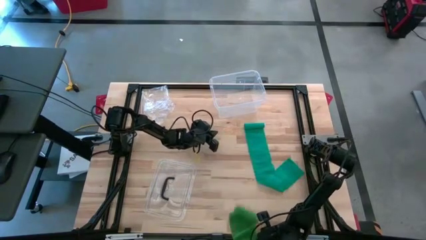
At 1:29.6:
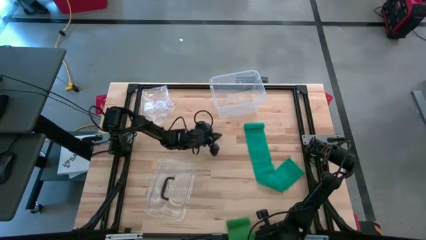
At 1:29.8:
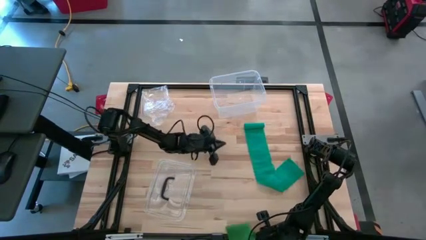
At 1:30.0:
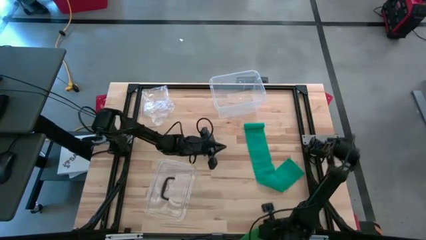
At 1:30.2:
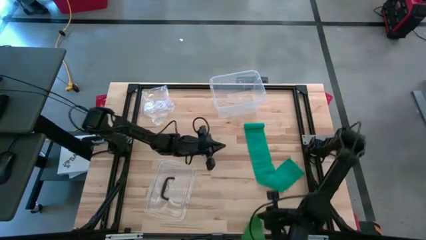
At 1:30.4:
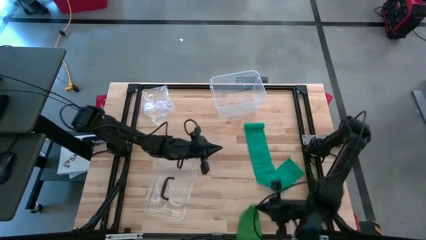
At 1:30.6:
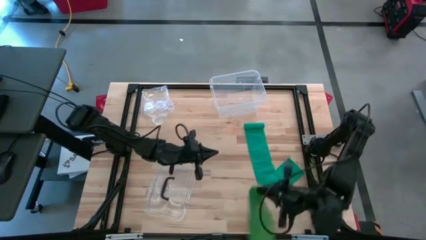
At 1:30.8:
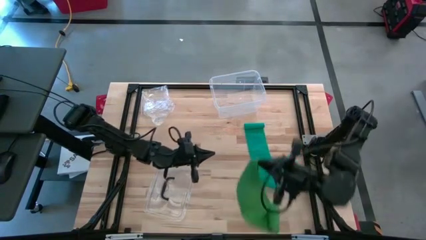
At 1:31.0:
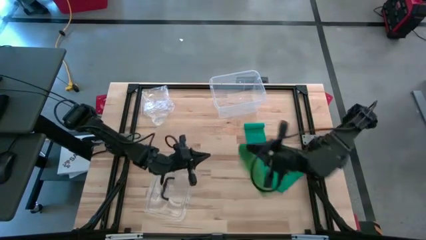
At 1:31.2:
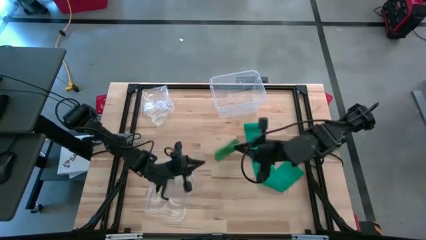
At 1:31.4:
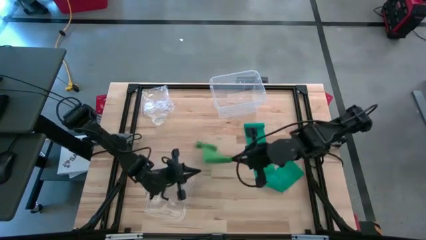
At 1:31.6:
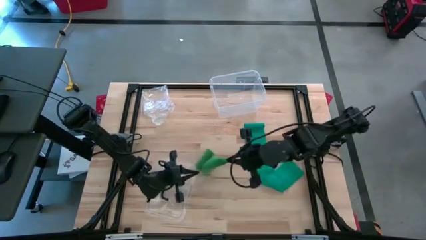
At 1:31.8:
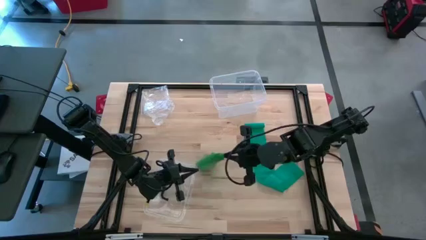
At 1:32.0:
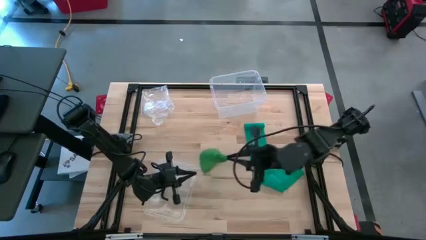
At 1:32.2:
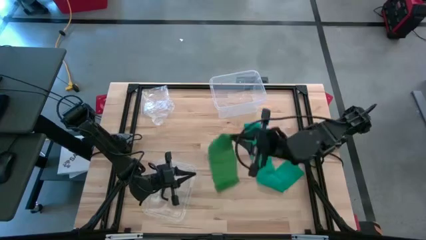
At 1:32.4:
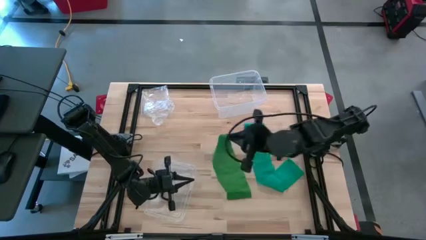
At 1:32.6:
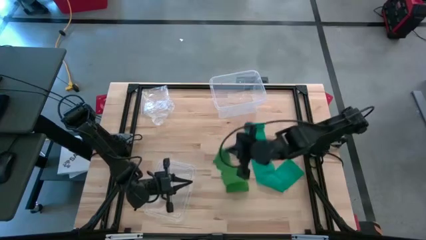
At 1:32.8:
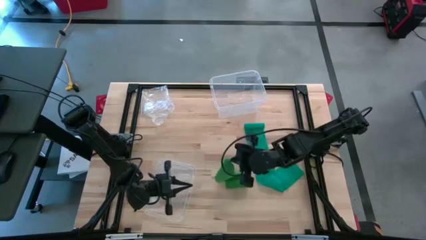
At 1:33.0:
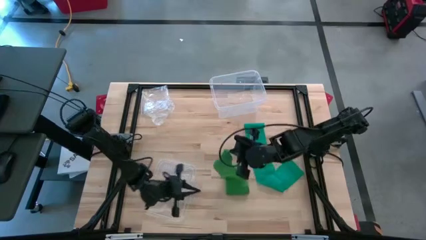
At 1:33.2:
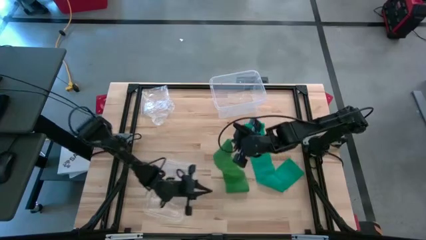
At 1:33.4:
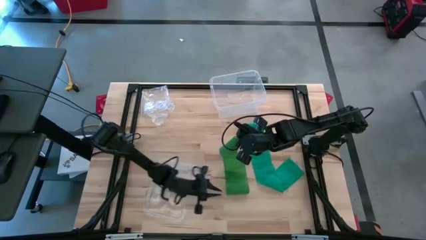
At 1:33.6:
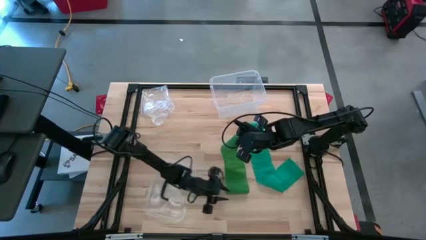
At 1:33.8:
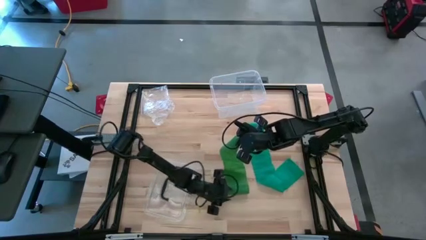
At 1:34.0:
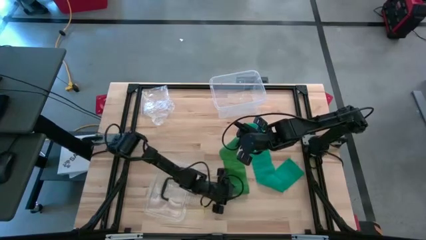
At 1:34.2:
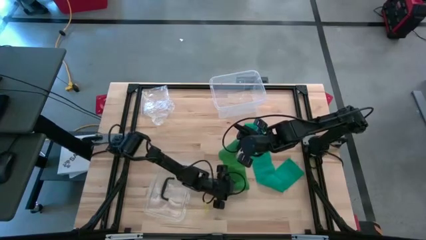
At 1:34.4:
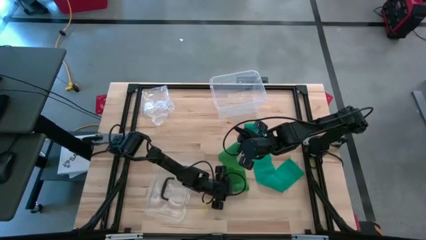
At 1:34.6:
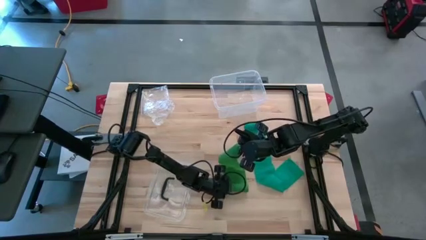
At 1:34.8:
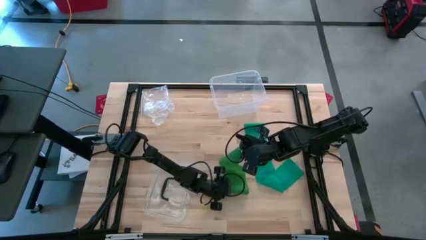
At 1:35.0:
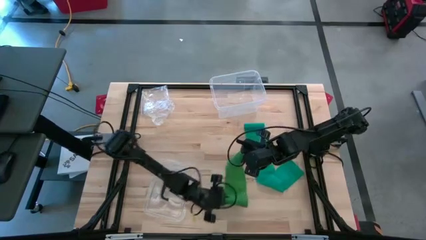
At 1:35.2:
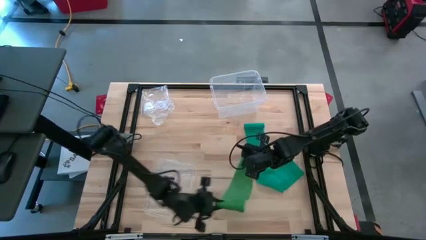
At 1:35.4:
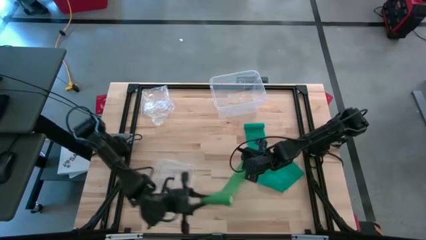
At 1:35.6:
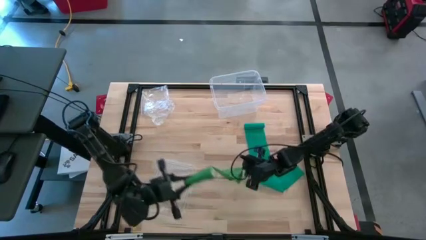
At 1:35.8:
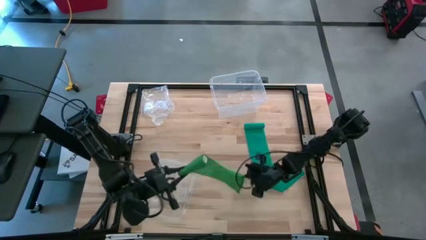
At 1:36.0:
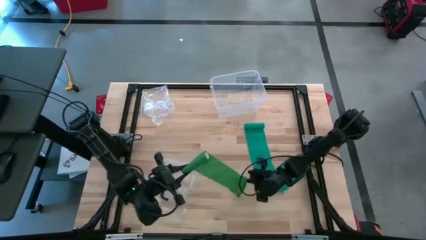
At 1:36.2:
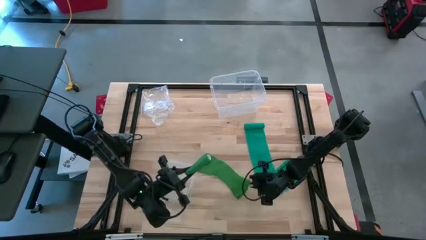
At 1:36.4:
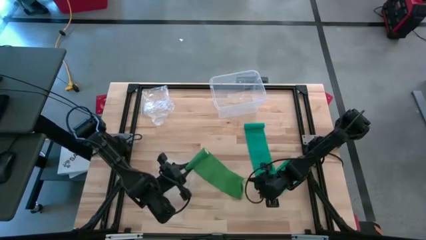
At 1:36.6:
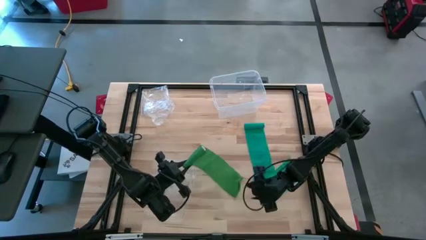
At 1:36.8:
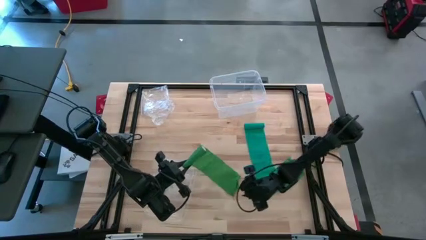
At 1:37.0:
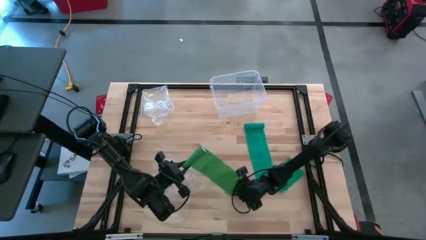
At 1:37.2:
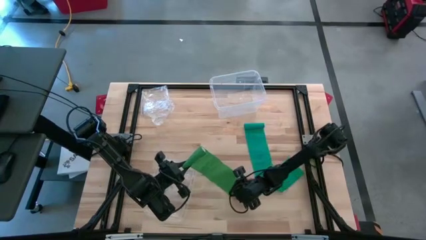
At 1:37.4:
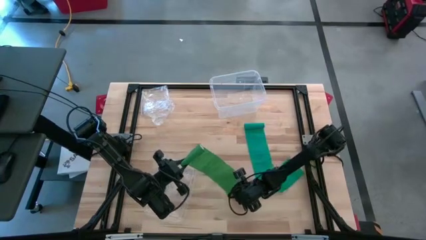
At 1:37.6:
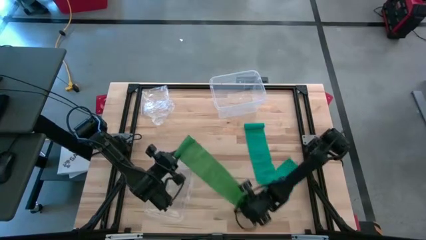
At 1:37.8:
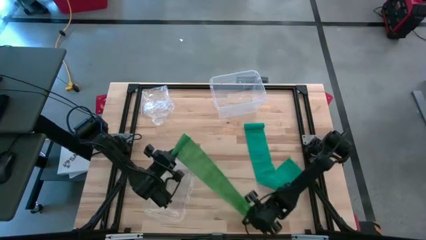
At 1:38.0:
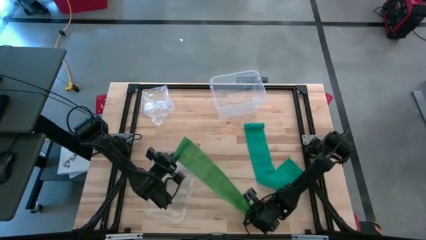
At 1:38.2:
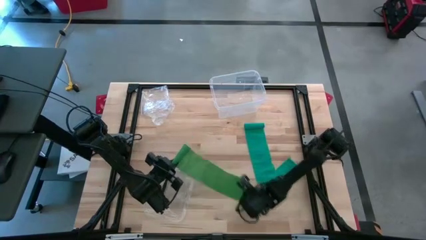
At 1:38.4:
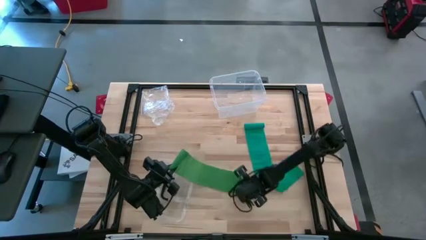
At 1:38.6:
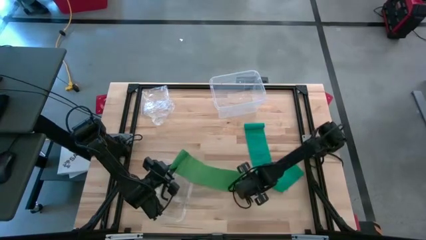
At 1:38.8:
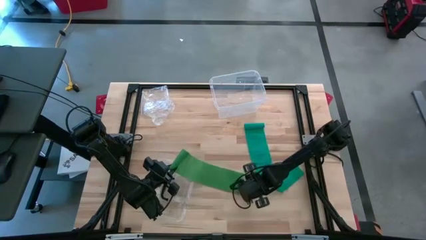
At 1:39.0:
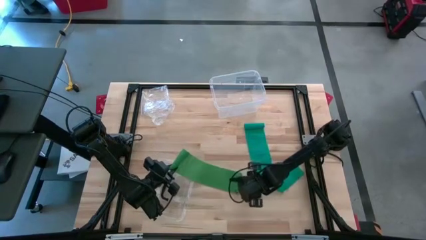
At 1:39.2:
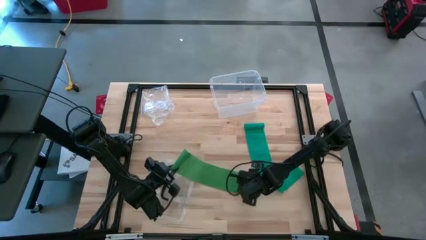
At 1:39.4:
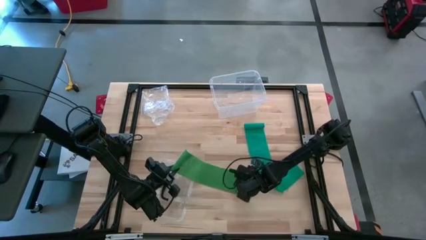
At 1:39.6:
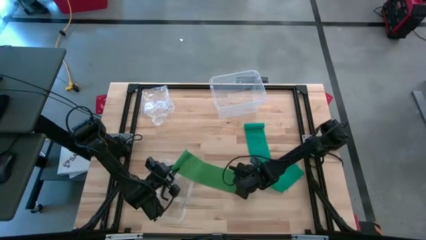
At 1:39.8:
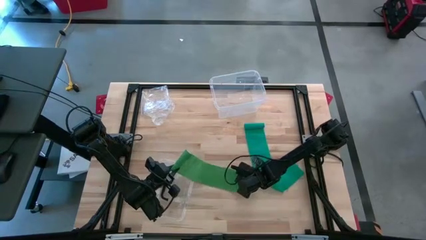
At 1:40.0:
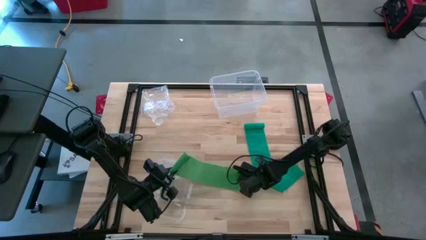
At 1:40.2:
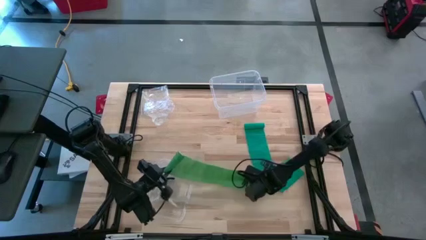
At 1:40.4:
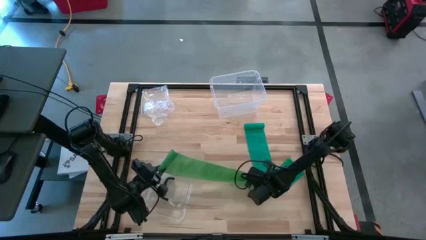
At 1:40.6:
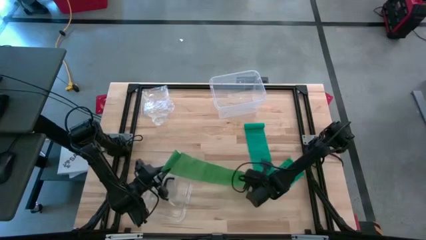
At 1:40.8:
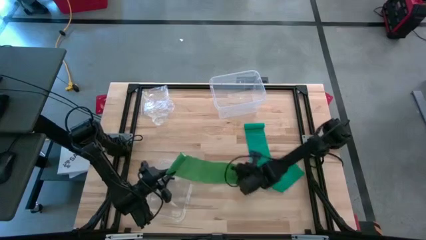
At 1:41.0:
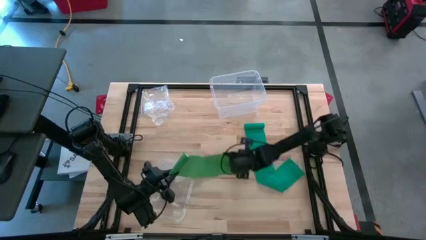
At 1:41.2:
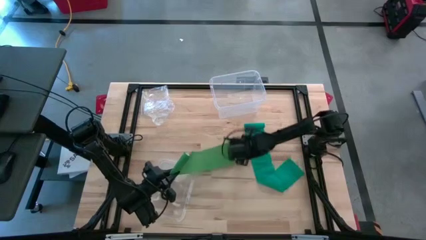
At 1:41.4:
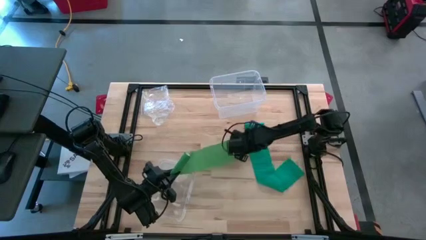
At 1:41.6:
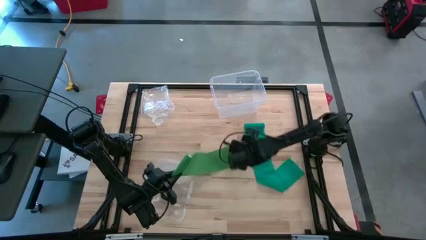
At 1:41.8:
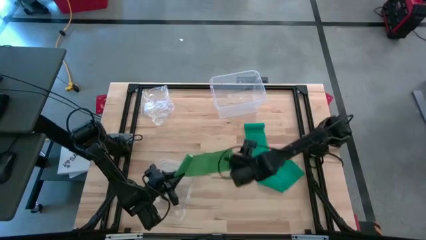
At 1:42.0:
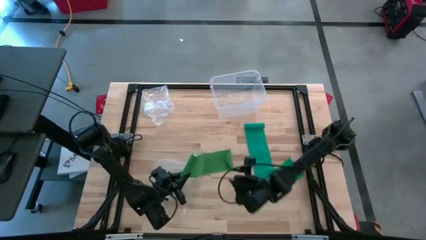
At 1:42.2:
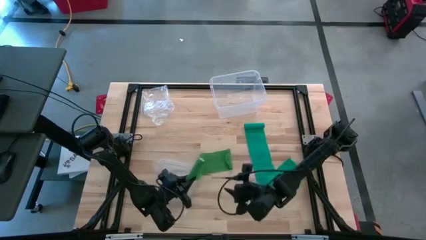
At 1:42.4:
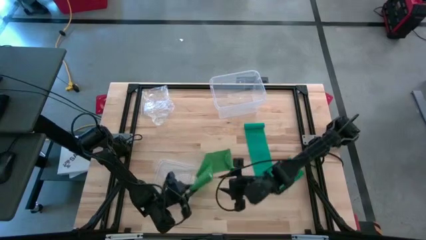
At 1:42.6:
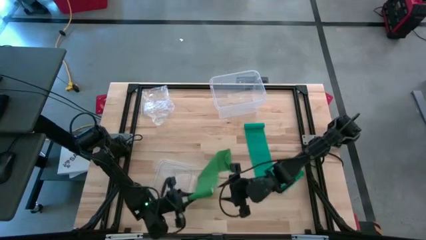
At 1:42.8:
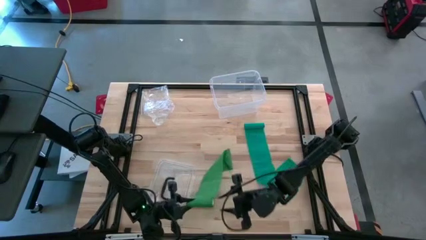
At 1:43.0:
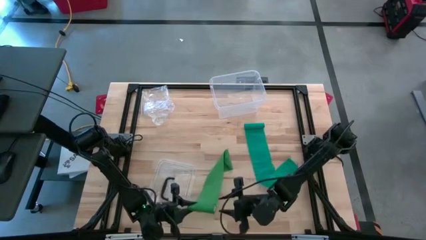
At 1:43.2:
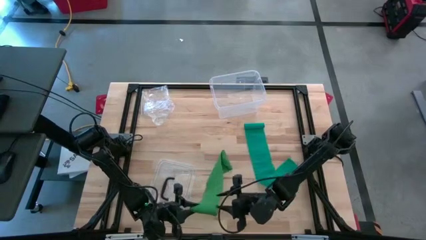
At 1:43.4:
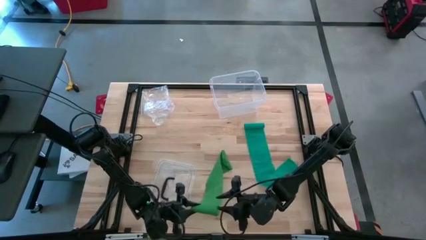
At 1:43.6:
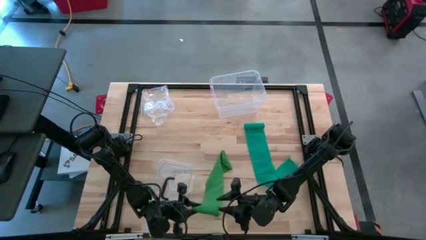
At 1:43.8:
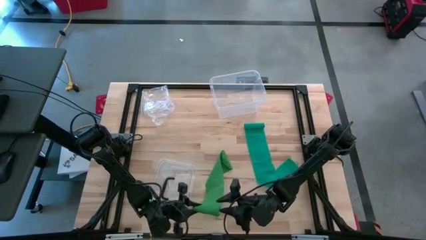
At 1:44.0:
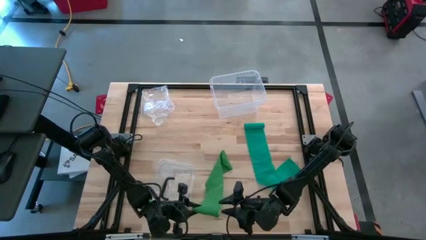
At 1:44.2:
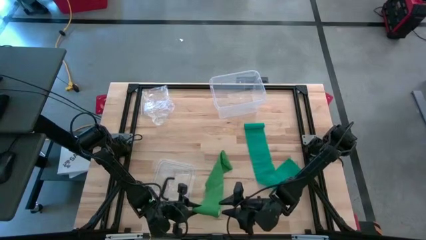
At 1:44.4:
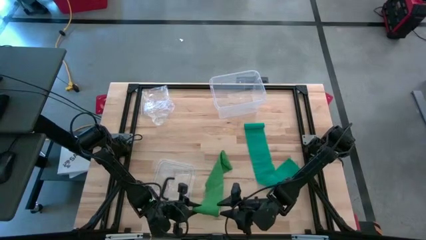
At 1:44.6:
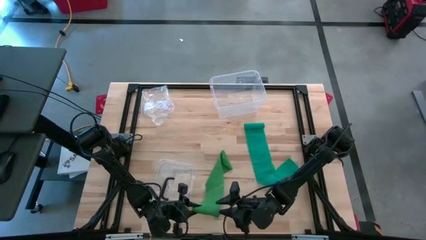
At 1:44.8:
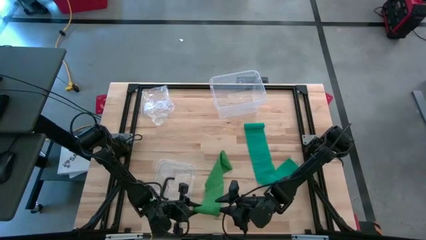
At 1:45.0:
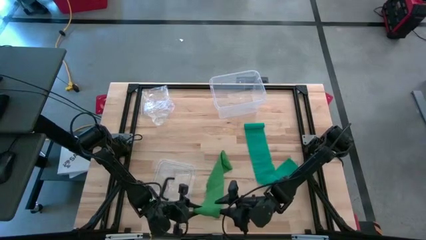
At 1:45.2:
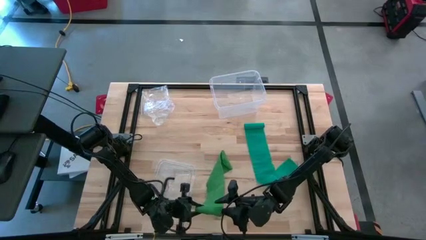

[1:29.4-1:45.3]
Task: Roll bandage
Roll the green bandage

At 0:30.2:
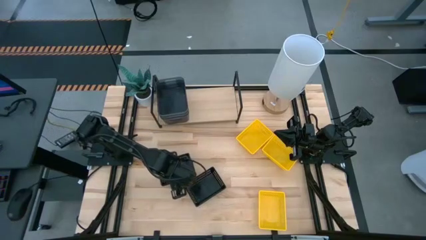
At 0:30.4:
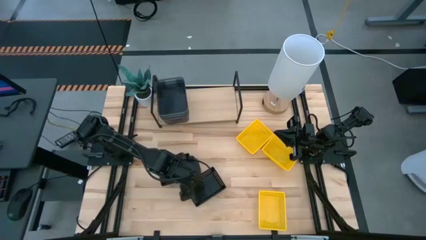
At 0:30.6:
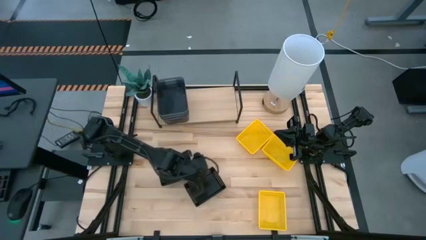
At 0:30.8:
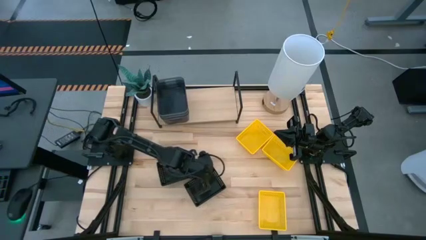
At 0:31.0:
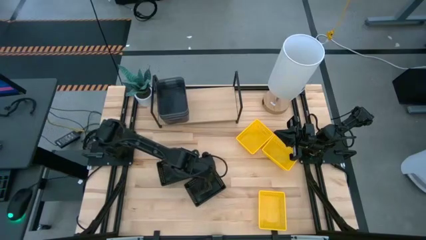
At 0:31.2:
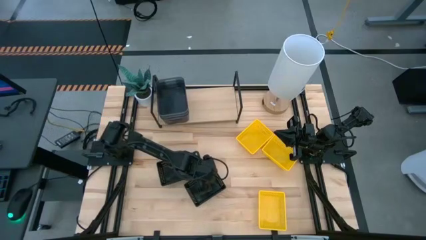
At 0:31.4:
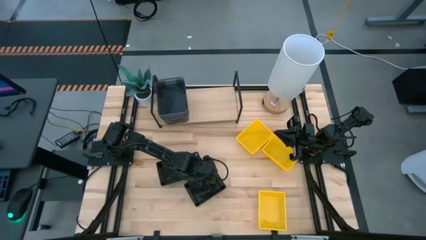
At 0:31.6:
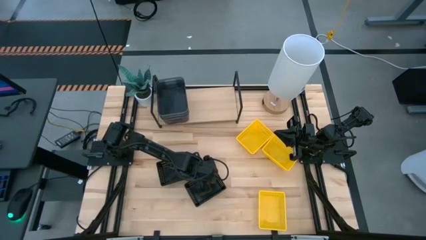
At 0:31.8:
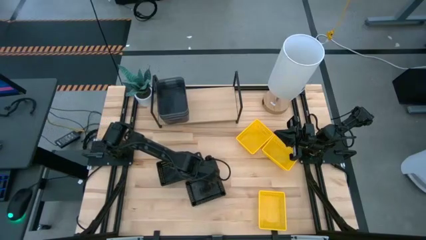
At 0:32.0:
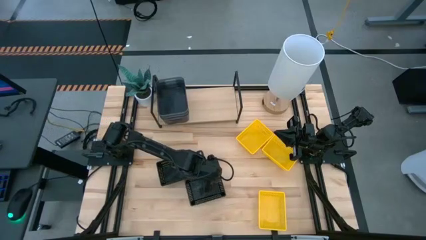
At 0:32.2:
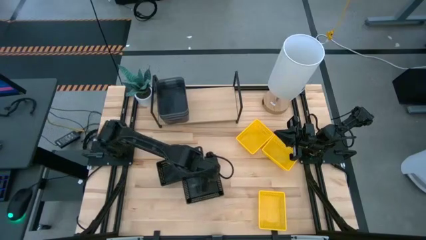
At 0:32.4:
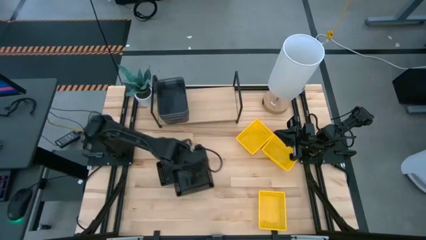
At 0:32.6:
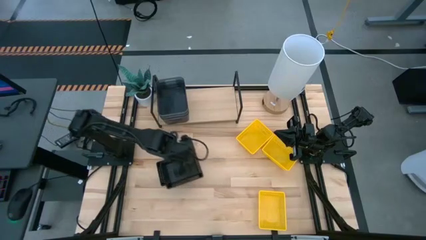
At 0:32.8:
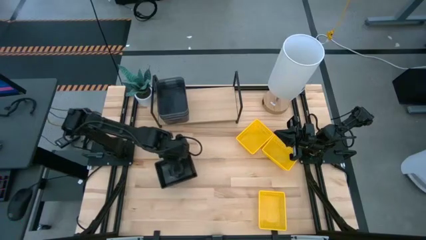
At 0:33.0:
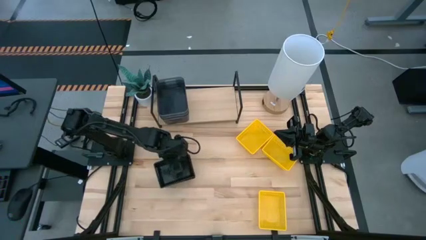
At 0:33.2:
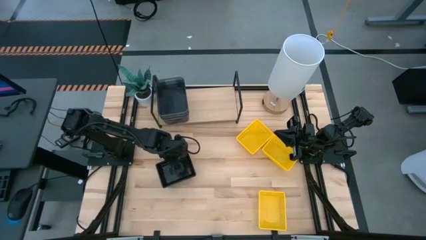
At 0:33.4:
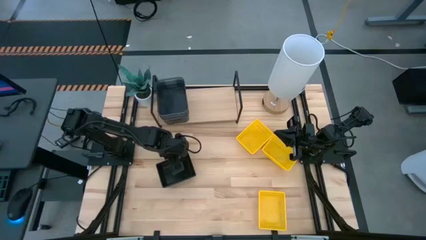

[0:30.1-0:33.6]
Task: Stack baskets on shelf by color
Stack the black basket on top of the black baskets
